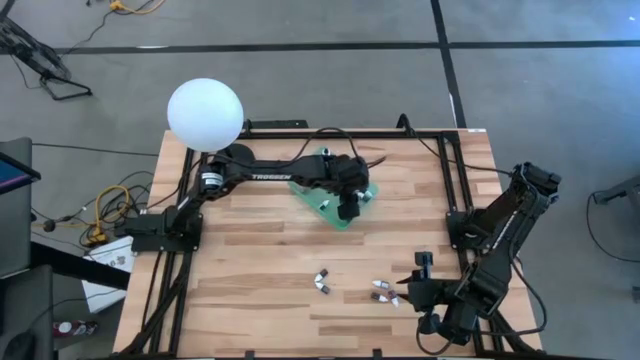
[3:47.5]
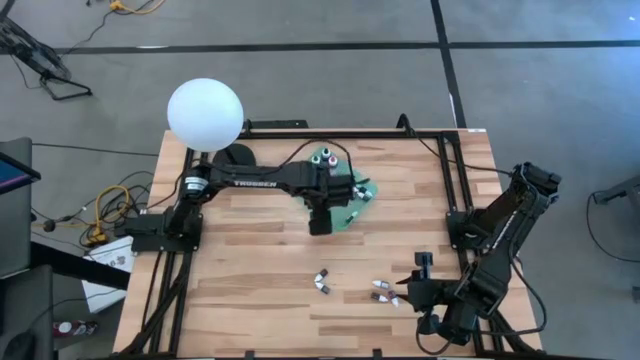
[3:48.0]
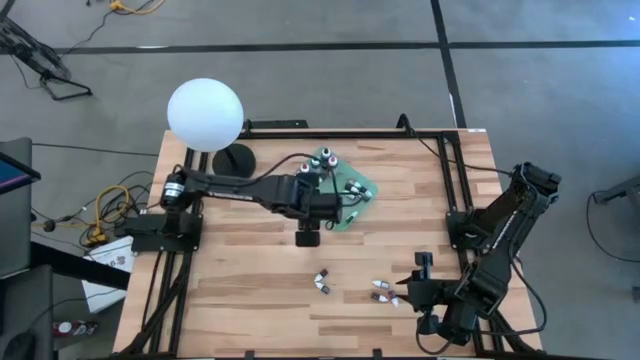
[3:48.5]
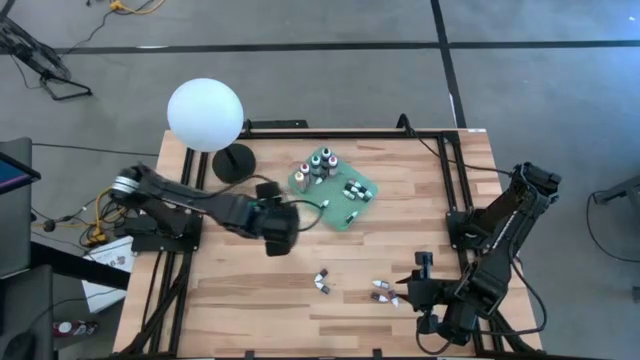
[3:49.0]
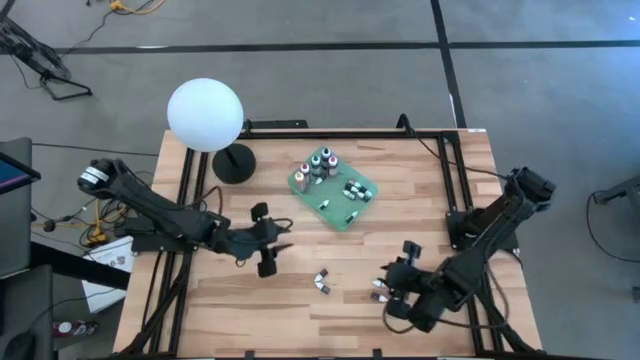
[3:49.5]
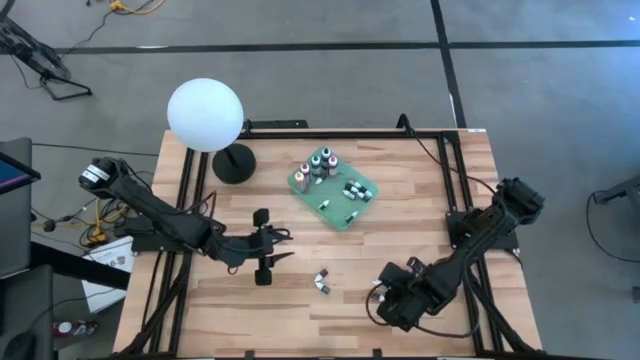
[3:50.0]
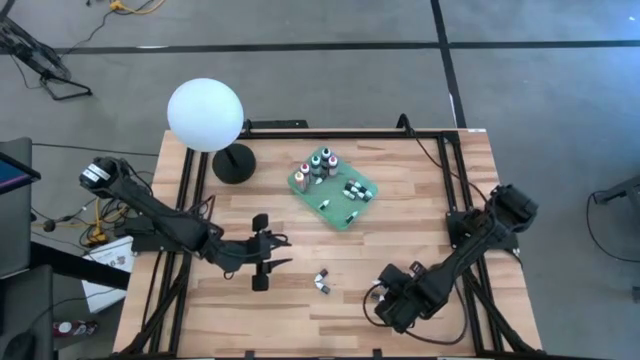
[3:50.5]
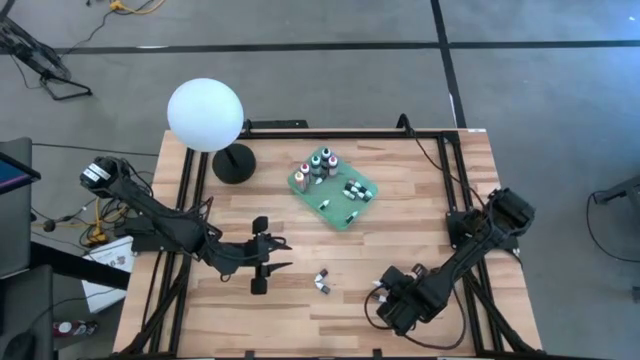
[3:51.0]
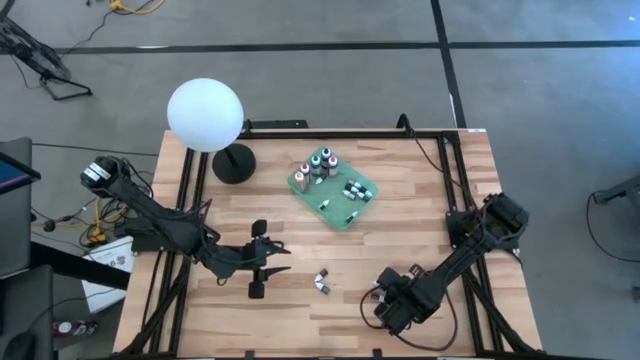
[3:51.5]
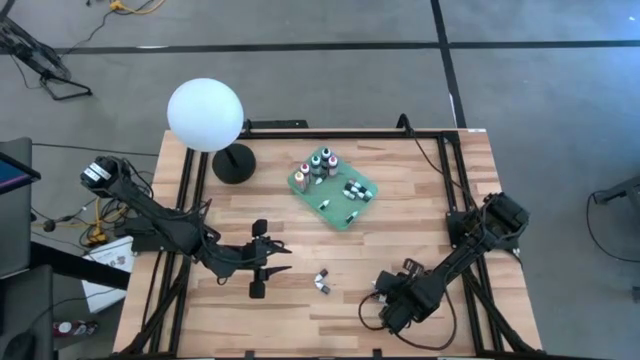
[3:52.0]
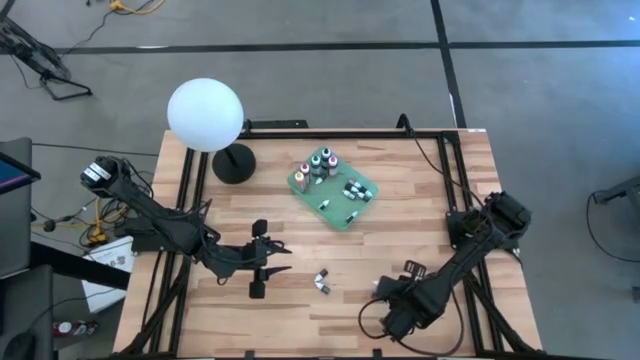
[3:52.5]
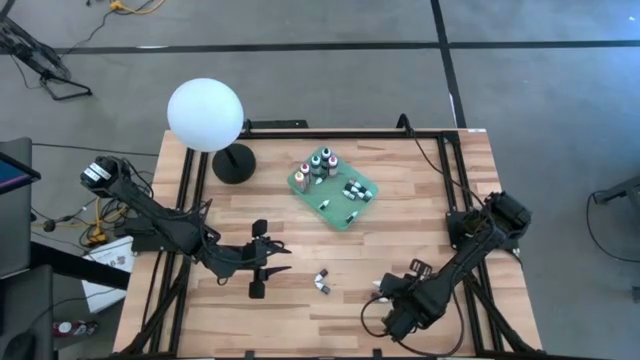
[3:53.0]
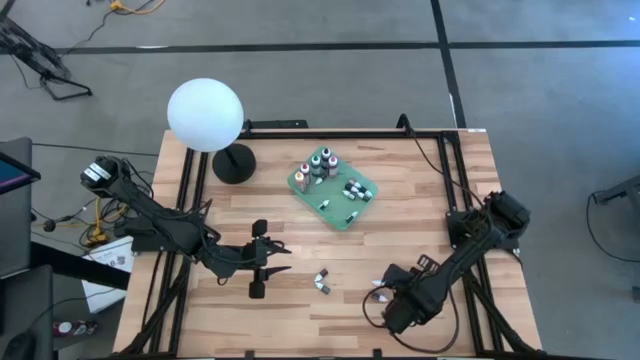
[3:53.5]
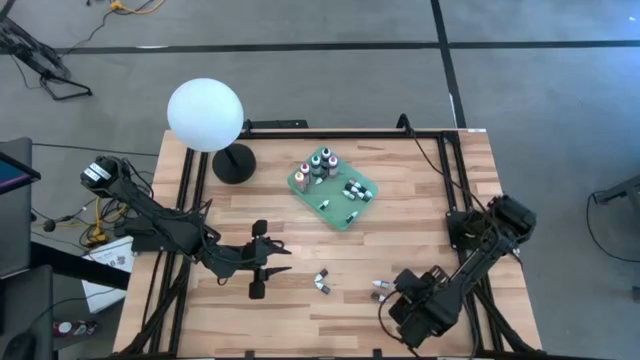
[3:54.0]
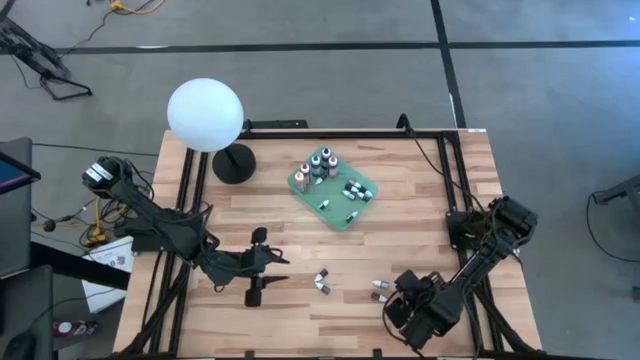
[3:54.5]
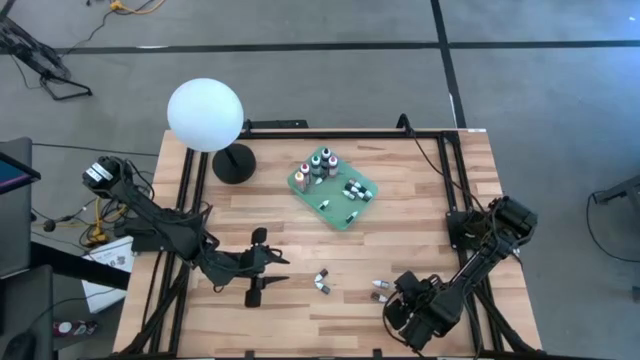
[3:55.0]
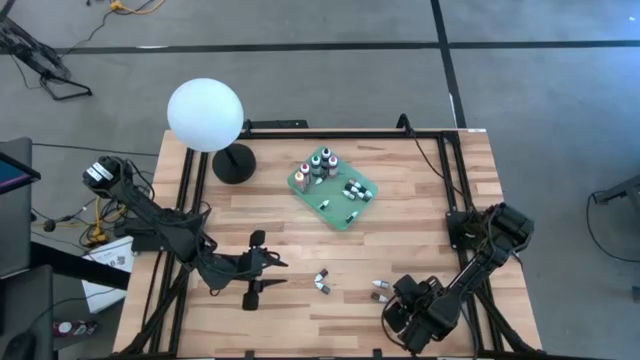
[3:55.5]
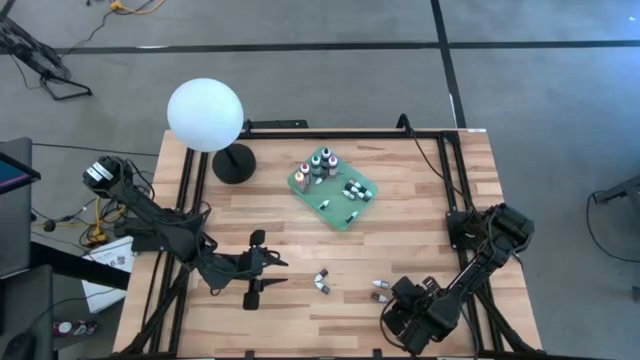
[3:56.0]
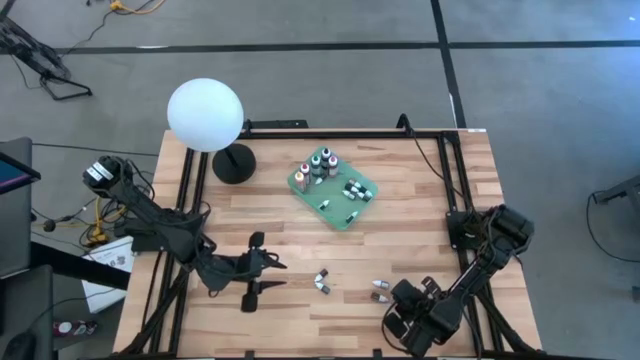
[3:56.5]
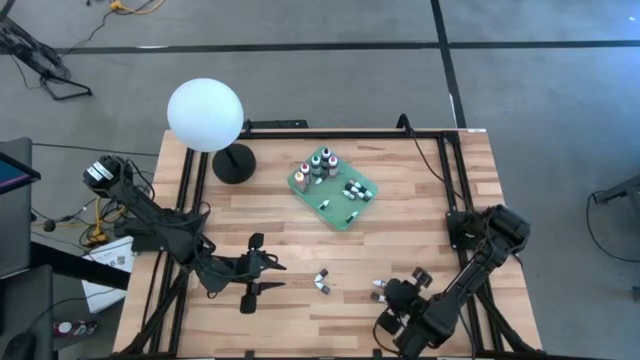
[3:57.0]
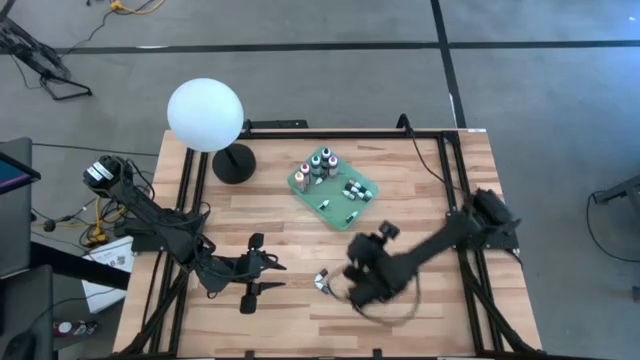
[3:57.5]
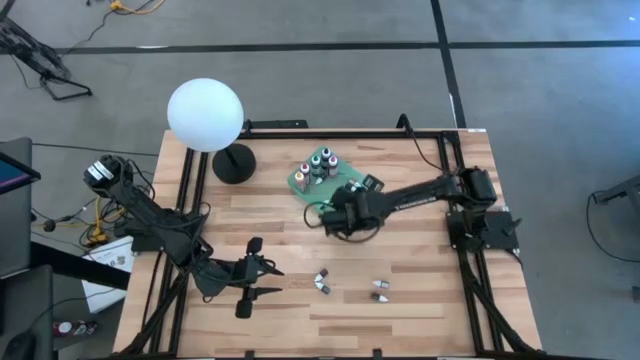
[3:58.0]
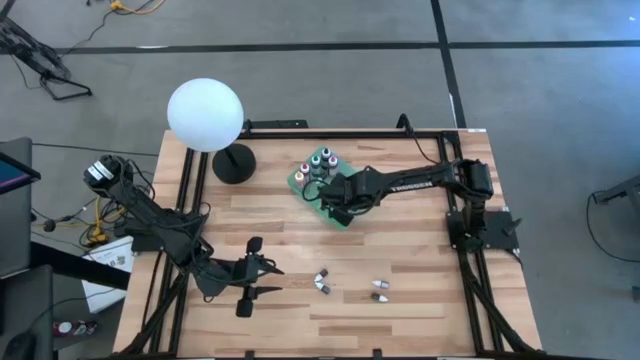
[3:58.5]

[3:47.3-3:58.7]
Task: Pick & Place food coloring
Put the small purple food coloring bottle into the green bin

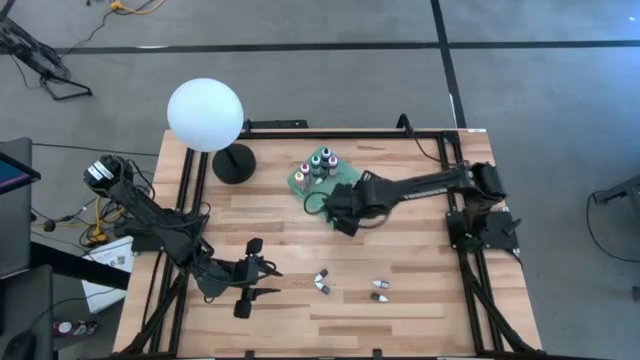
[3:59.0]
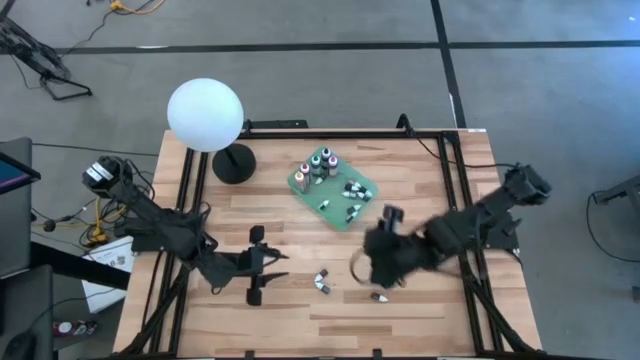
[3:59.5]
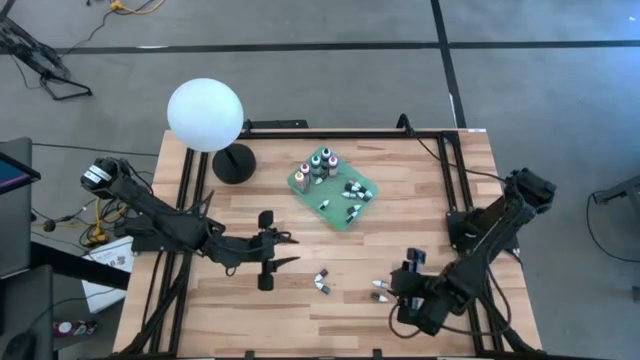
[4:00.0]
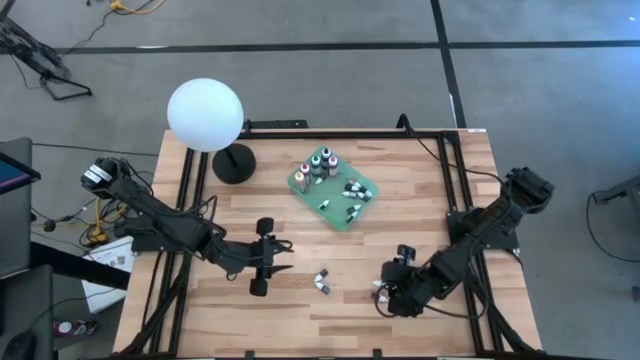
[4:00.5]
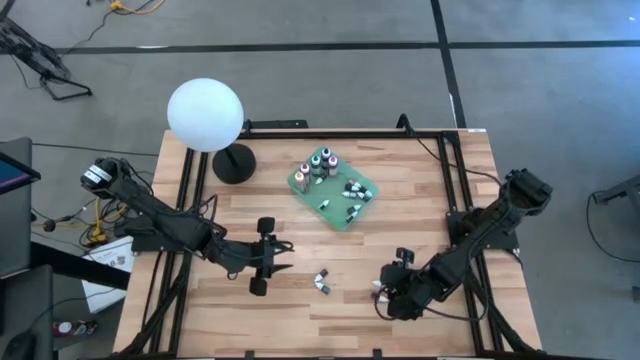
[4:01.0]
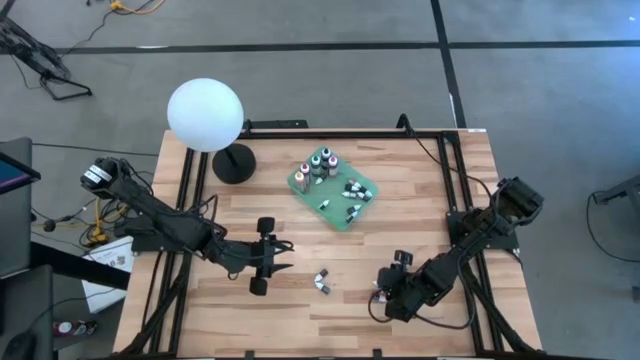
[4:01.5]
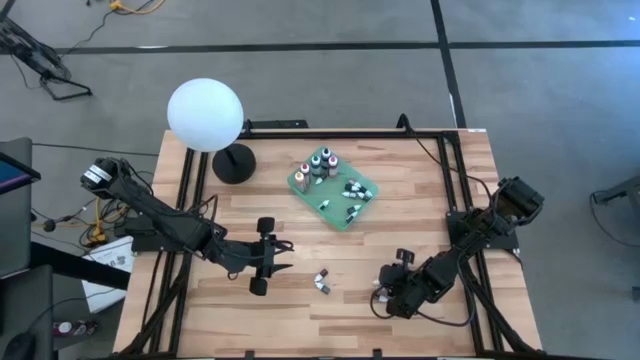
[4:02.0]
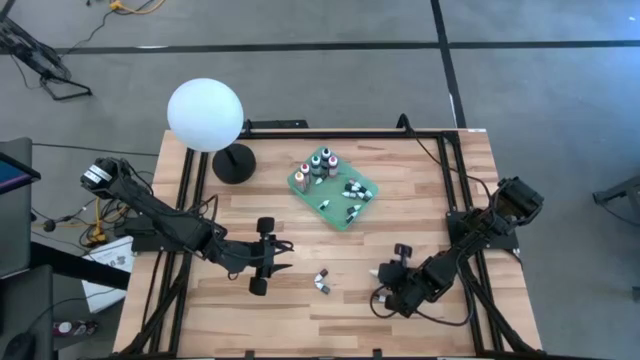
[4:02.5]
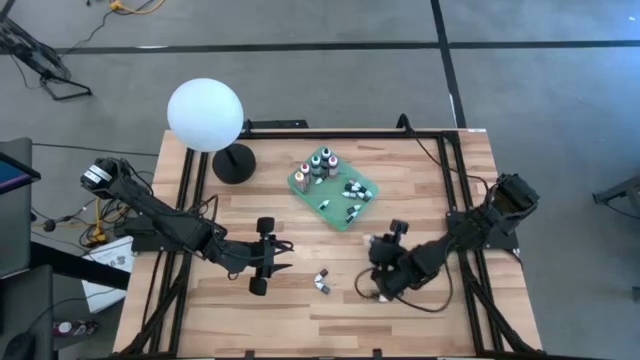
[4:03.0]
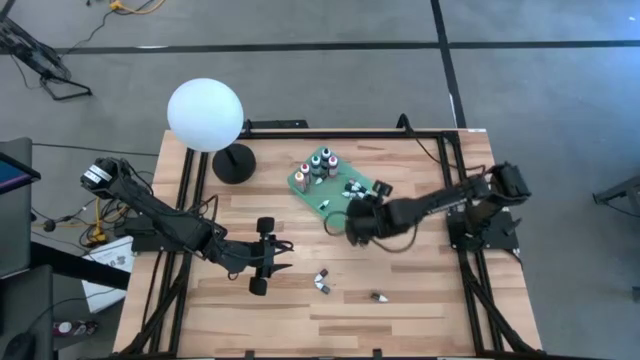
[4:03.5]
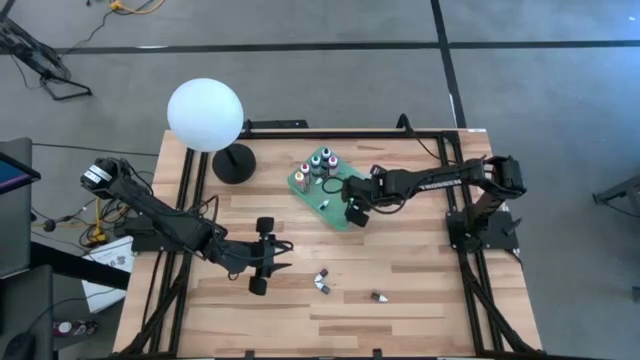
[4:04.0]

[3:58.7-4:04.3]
Put the small red food coloring bottle into the green bin

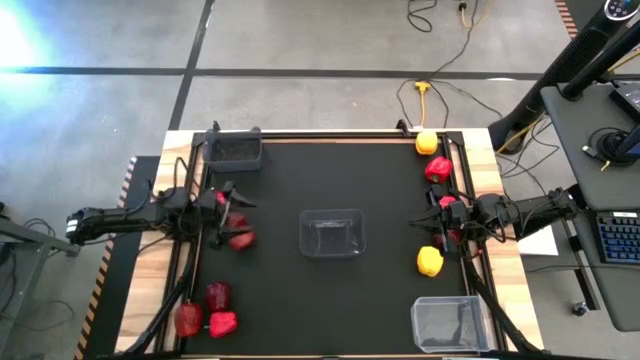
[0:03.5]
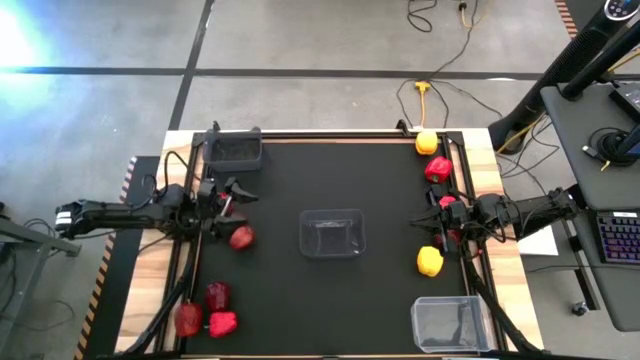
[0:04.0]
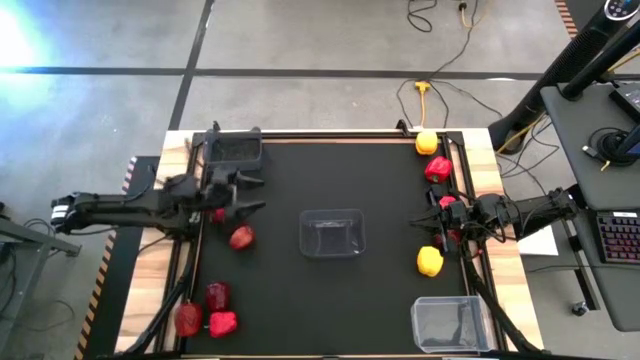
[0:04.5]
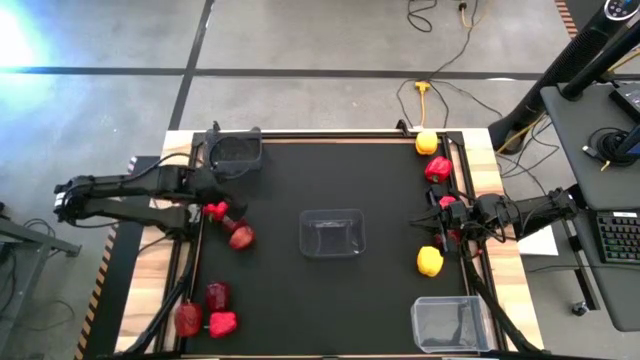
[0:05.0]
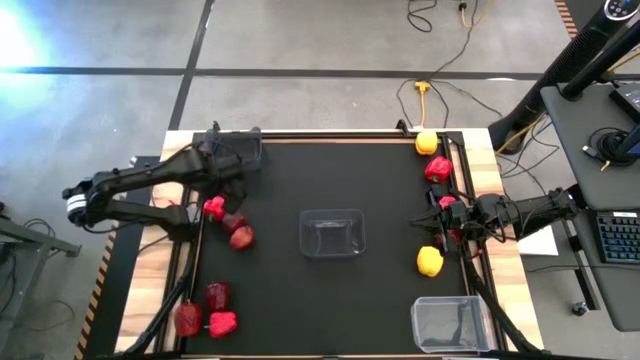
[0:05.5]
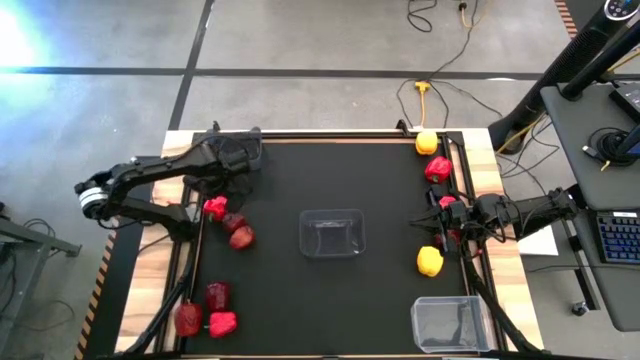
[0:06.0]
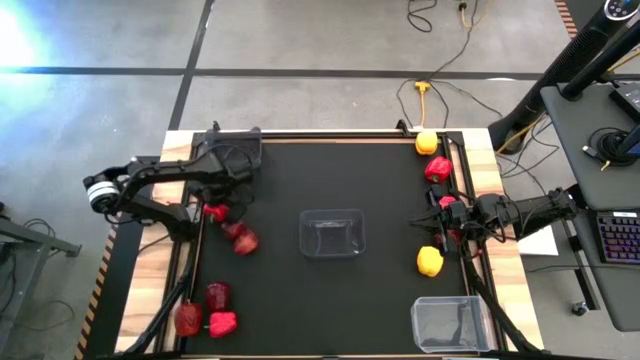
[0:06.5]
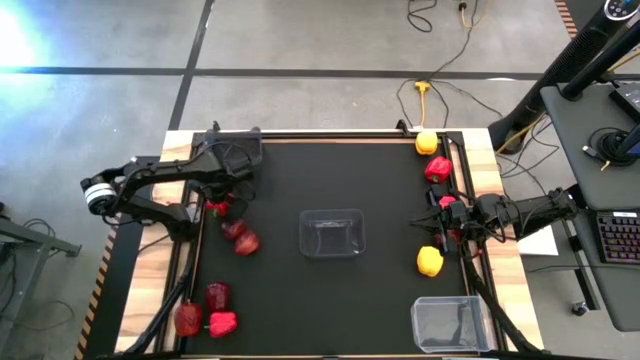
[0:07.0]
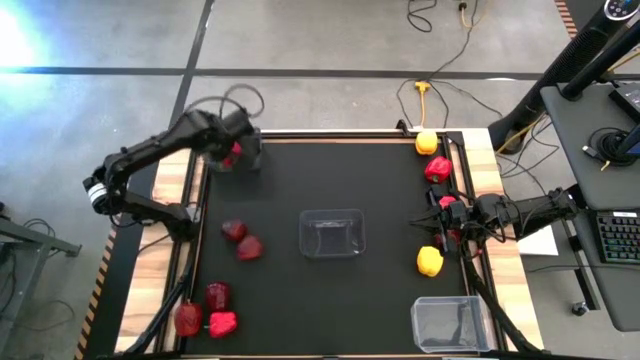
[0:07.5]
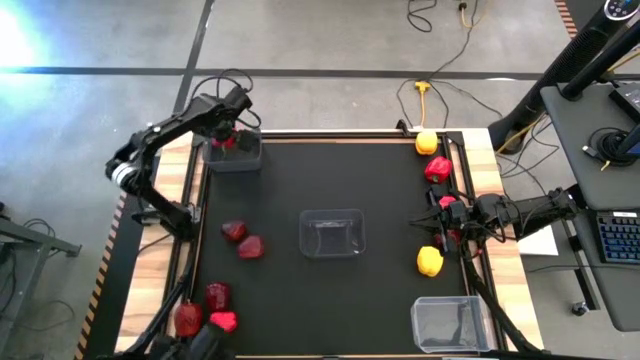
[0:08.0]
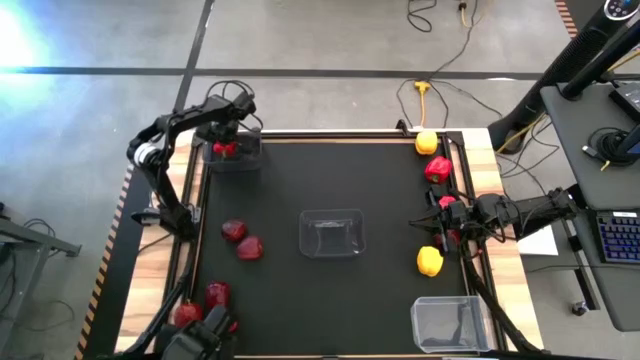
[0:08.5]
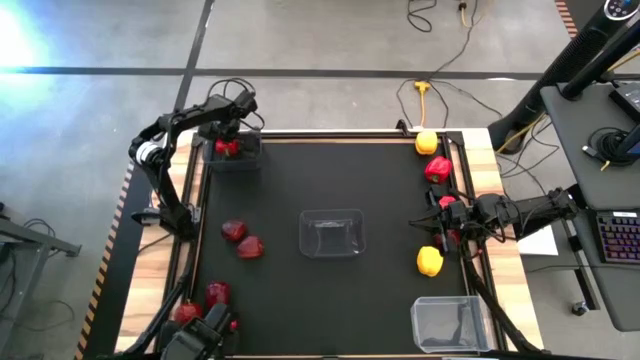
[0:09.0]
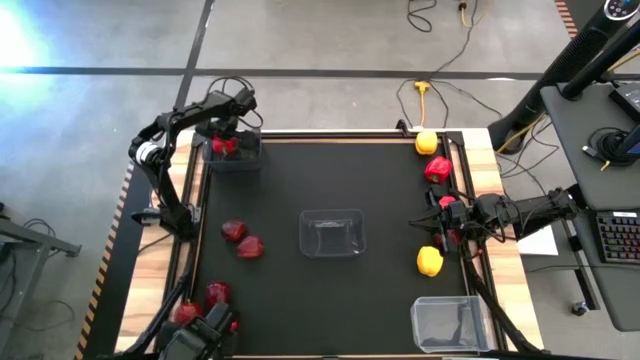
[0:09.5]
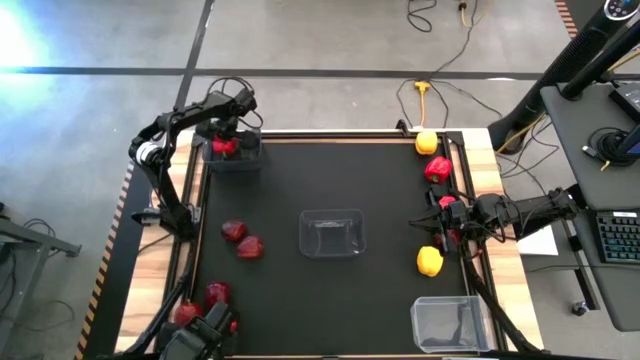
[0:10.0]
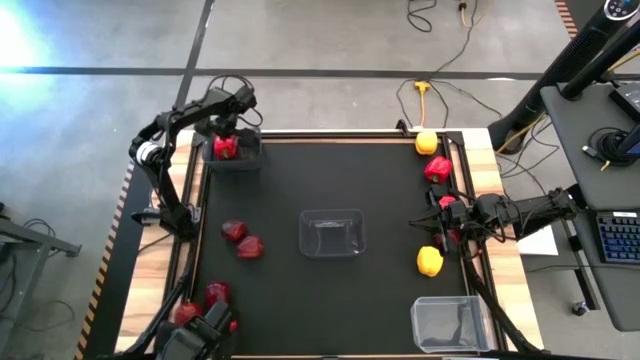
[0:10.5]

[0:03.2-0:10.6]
Task: Sort produce into baskets
Put the red bell pepper into the top black bin
